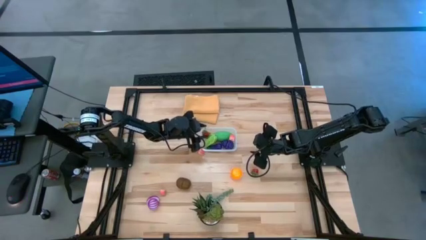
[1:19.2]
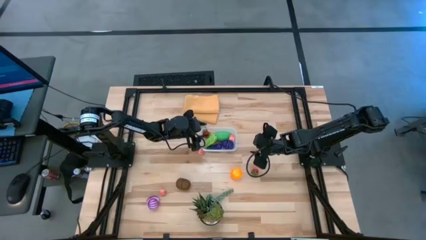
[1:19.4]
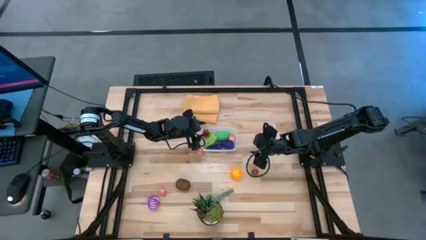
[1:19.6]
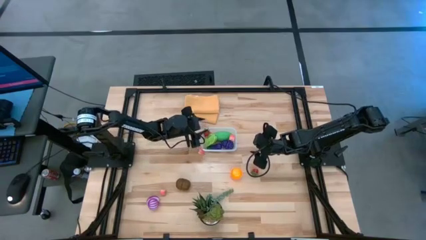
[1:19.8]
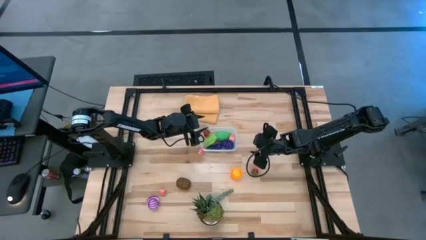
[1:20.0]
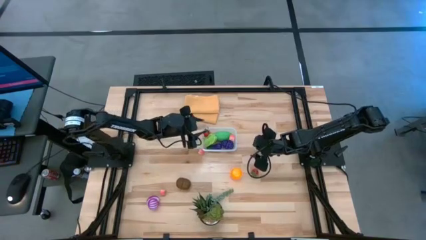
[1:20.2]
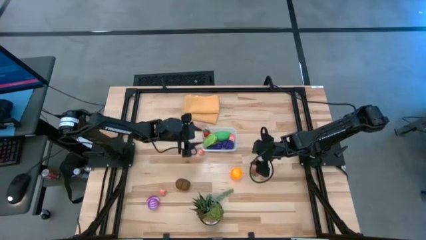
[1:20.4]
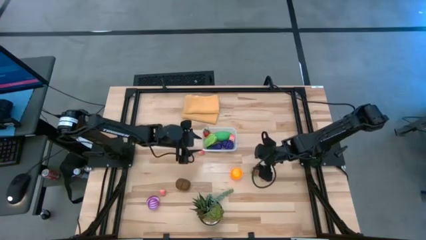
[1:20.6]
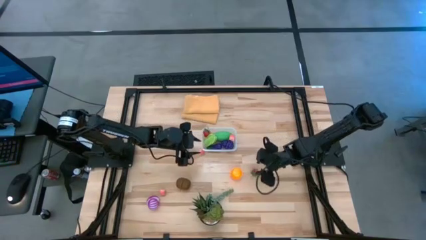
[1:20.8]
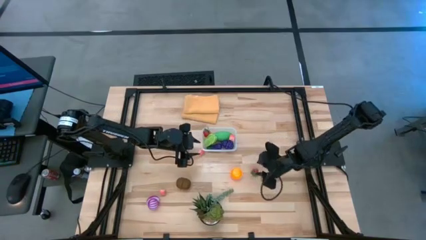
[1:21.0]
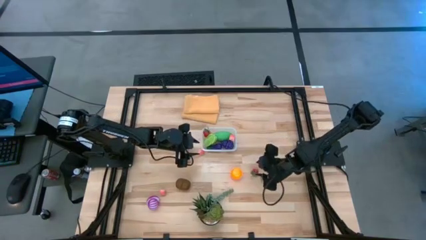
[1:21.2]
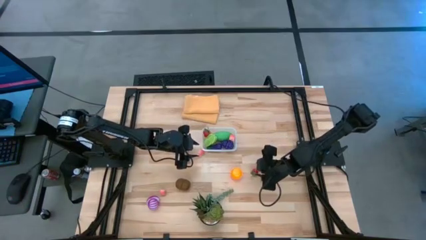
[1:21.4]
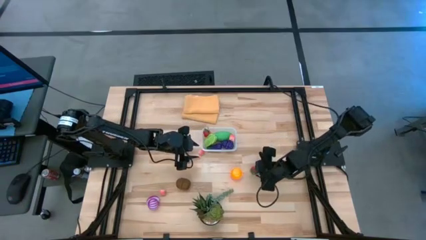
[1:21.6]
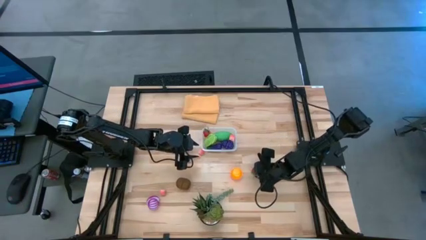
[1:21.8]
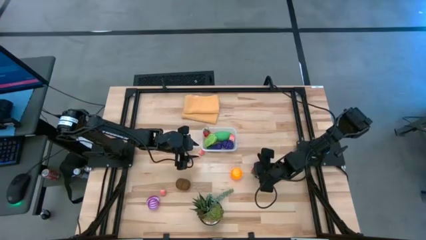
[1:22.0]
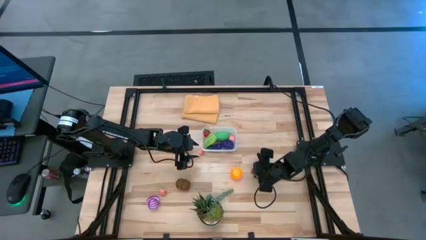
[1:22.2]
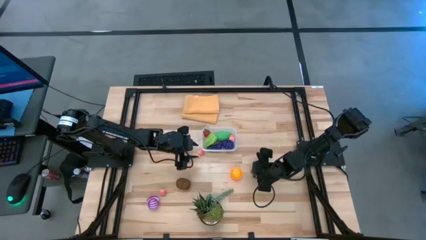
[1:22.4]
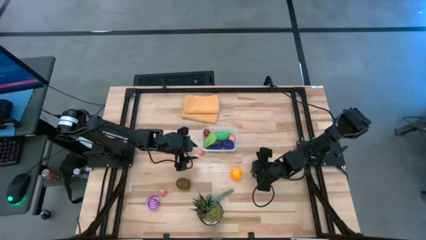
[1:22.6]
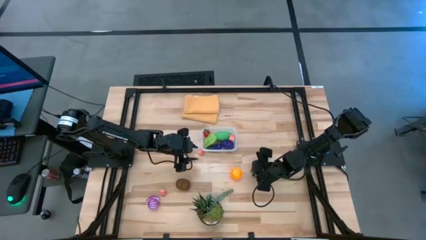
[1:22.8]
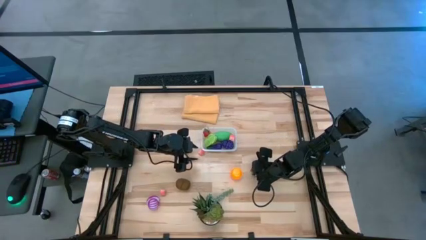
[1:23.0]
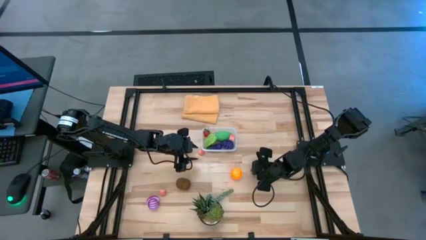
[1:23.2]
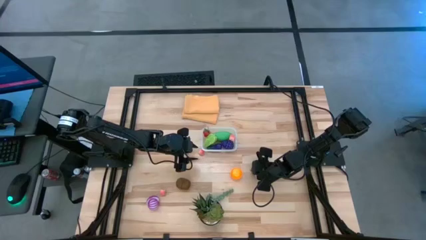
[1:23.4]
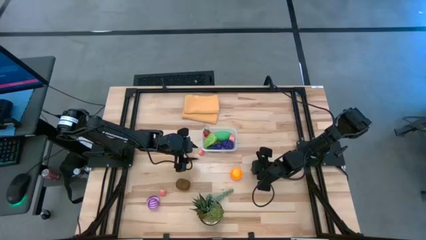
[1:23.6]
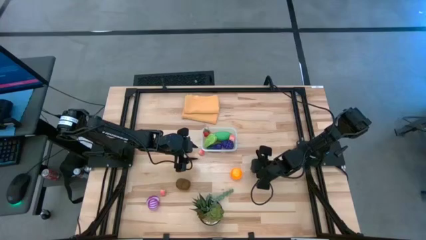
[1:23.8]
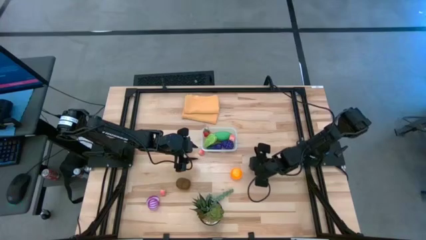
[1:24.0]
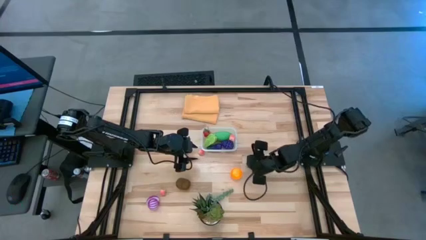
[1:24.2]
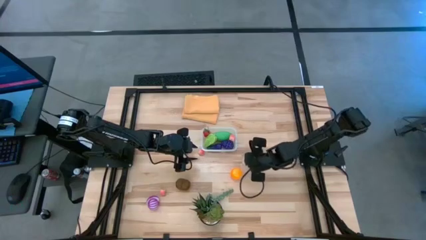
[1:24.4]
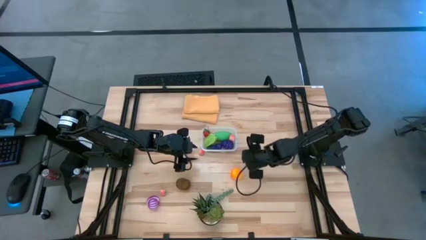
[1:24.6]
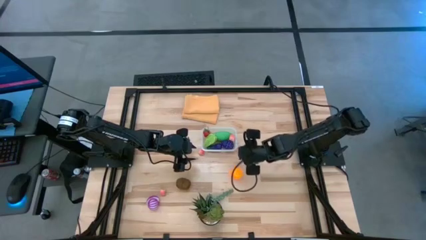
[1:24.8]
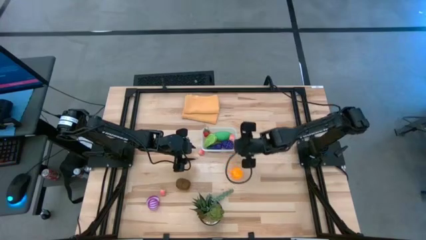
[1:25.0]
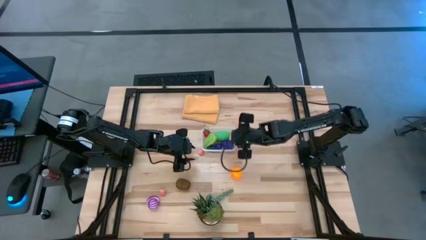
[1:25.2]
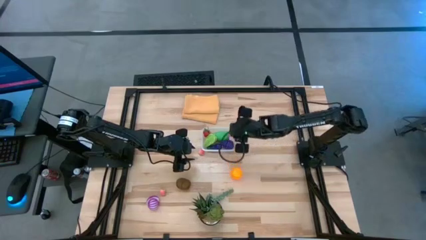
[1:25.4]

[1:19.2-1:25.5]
Task: Pick and placing Produce into tupperware
Put the red strawberry into the transparent container

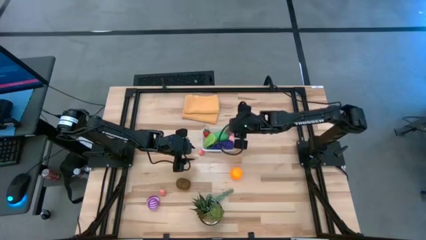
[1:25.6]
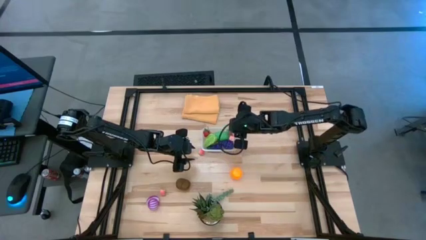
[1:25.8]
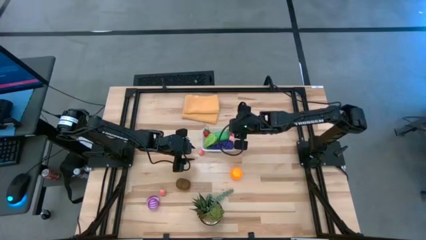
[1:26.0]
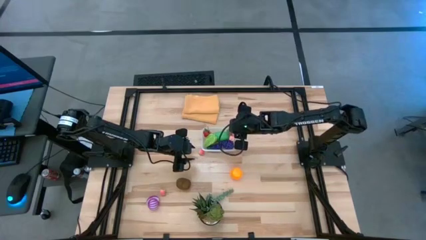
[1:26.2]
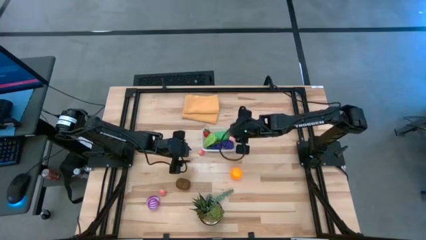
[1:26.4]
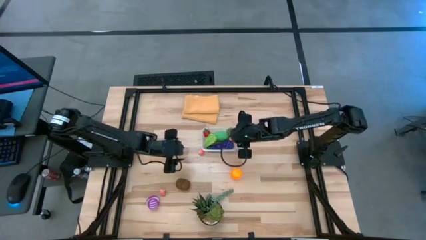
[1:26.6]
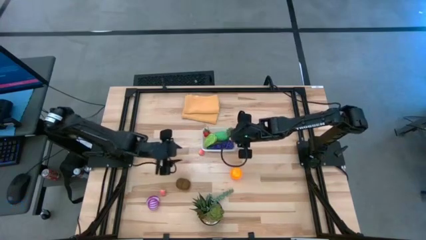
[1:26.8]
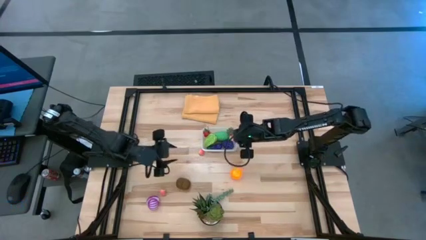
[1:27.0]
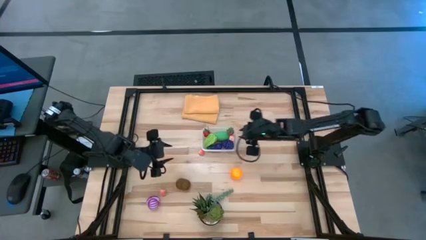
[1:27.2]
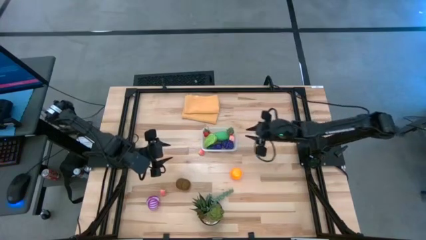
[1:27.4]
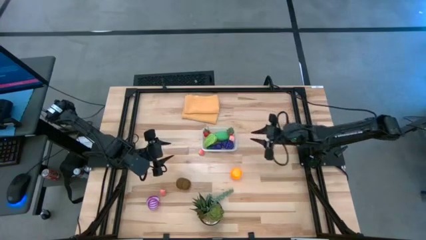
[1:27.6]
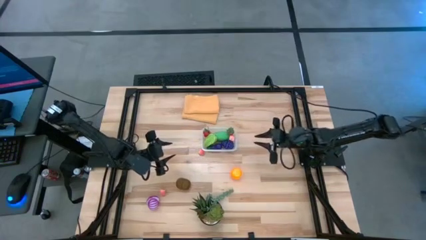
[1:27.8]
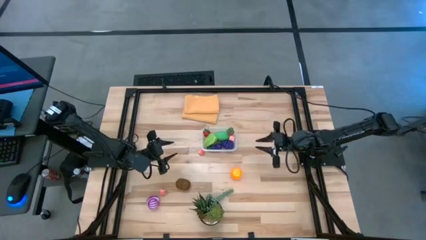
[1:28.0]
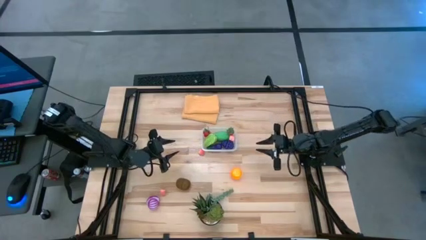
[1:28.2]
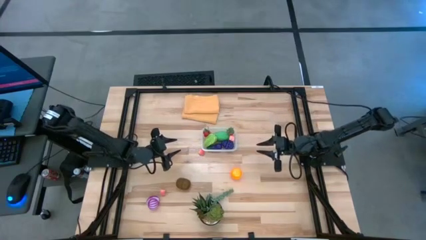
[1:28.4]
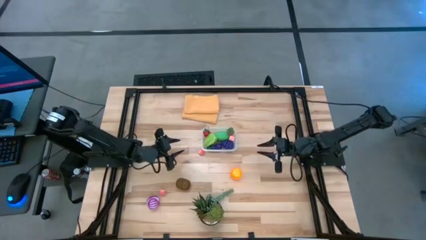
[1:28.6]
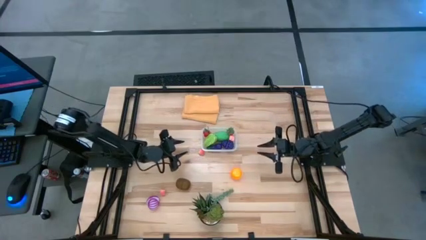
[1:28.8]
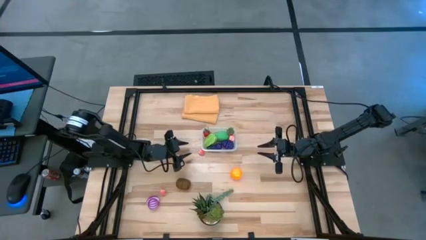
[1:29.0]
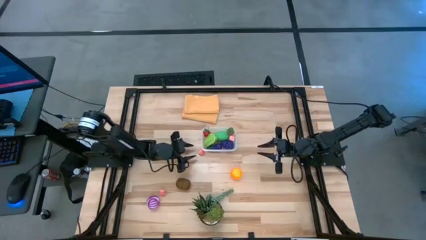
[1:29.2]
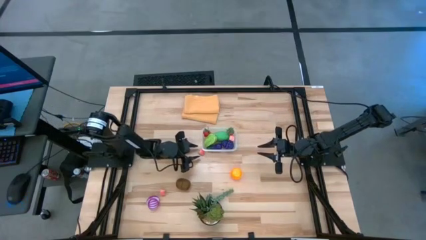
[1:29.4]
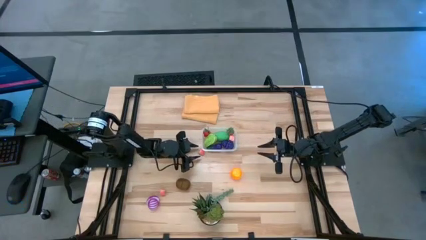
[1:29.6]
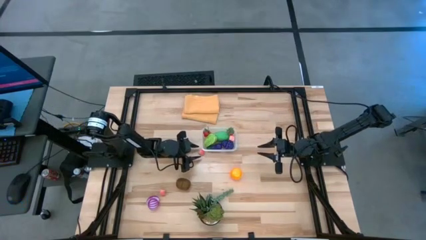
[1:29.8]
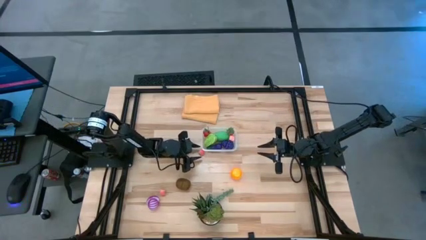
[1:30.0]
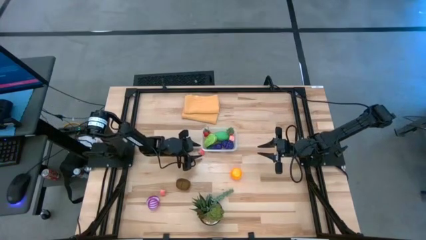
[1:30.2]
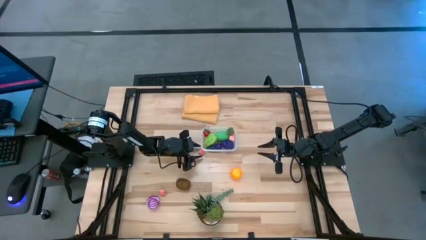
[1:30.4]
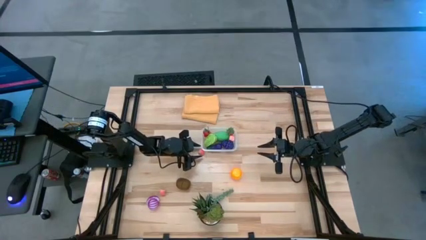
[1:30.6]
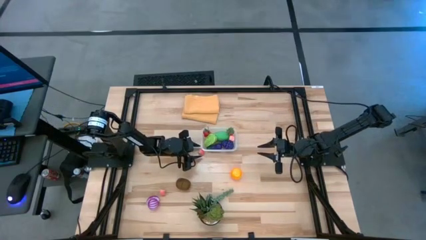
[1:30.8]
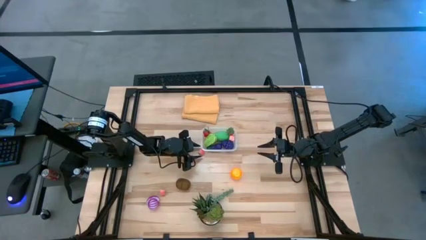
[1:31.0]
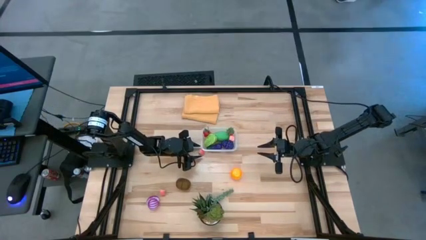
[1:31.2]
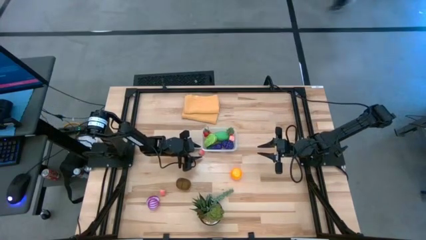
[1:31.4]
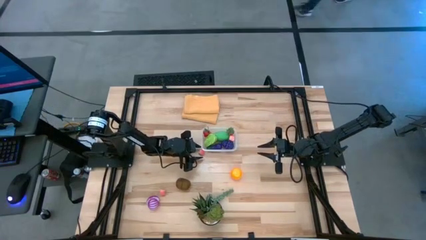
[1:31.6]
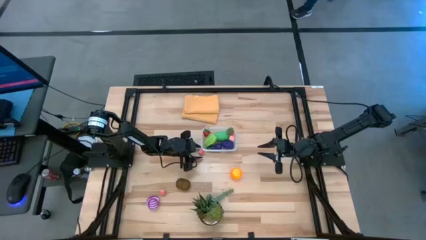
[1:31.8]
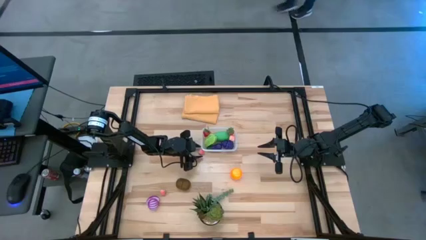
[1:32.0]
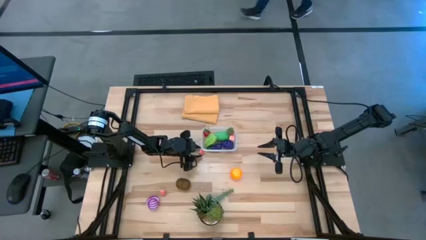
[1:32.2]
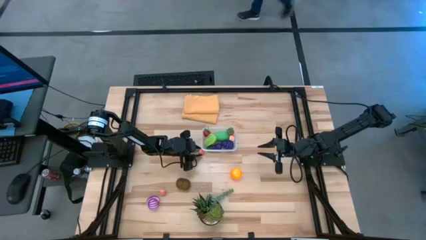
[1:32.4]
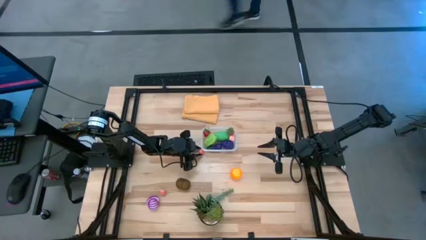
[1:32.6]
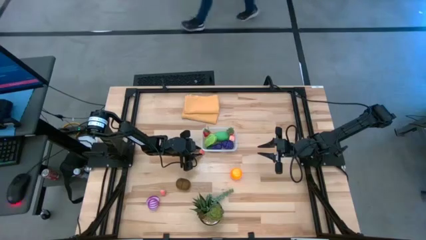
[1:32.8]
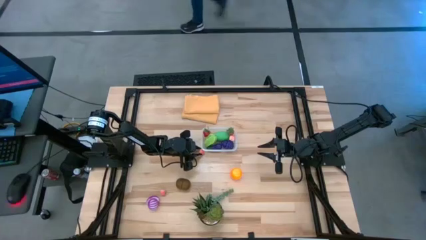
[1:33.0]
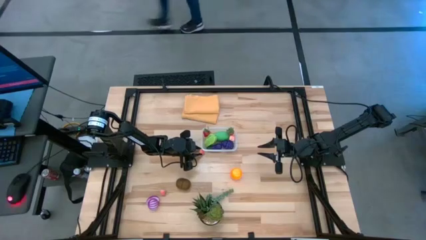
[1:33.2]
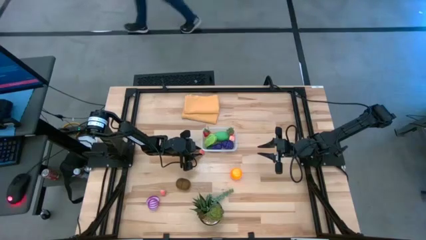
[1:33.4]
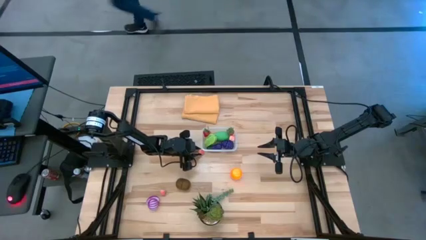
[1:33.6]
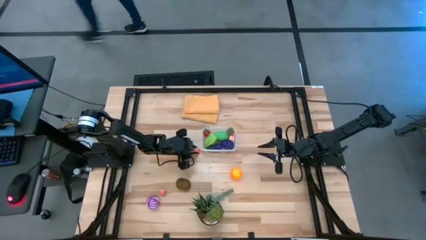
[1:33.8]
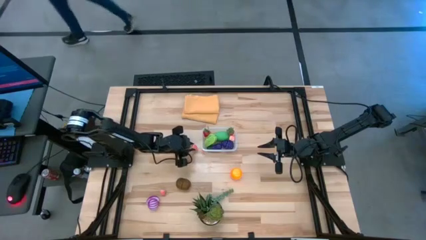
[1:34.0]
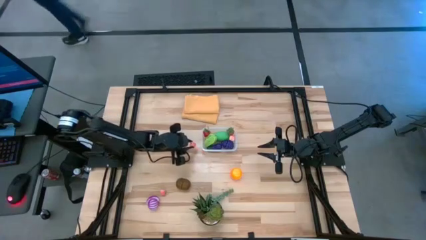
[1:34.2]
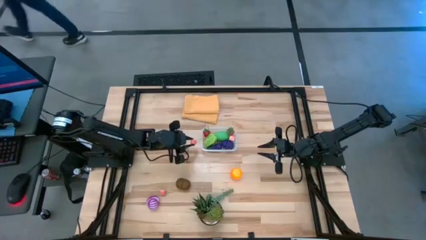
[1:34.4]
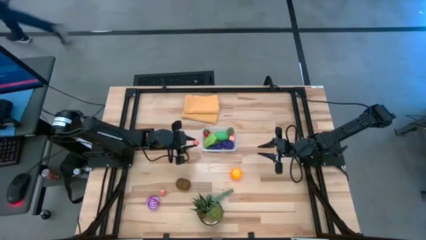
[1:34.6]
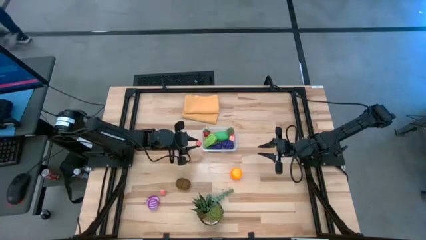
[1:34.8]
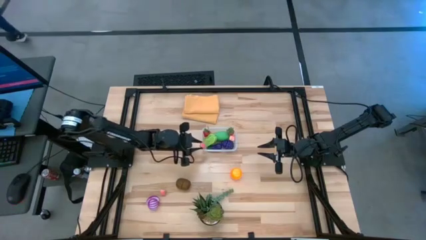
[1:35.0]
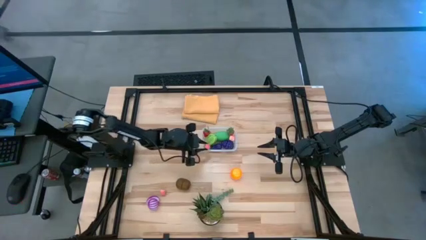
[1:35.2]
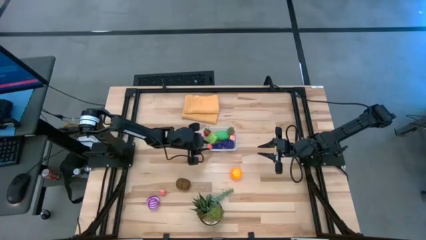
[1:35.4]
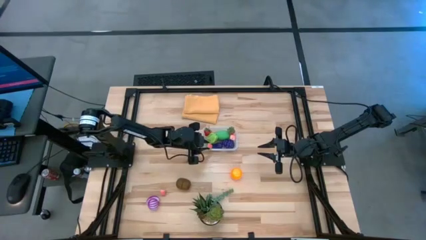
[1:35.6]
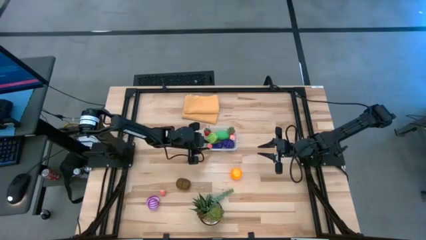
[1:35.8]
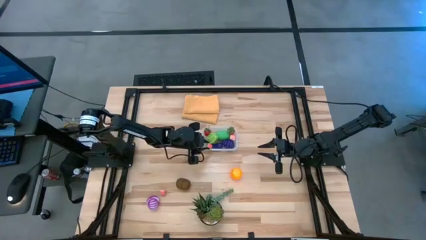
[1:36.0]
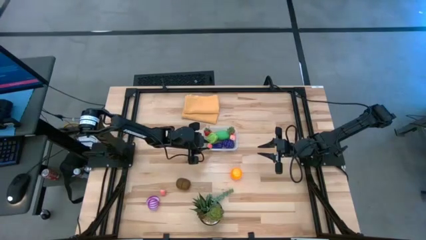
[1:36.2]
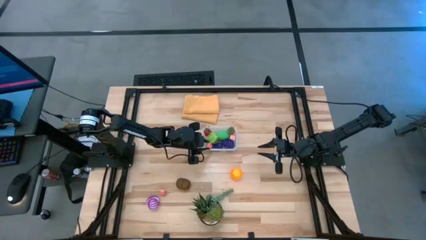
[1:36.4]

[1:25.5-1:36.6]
Put the top pink peach into the transparent container
